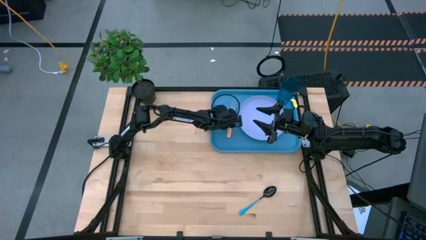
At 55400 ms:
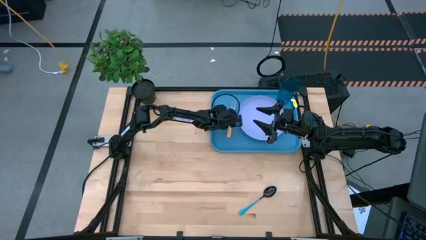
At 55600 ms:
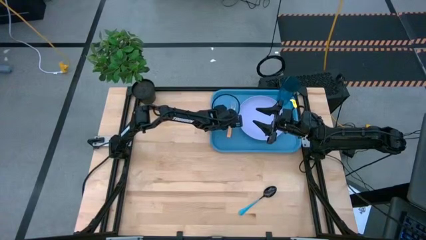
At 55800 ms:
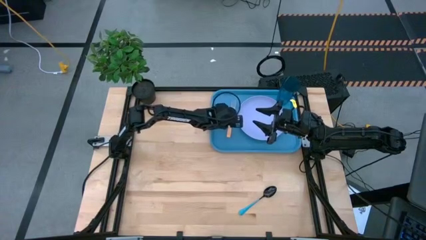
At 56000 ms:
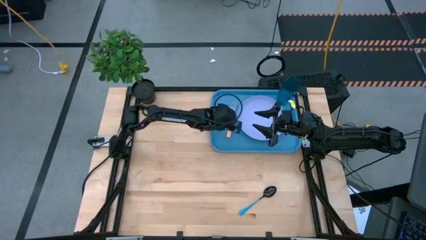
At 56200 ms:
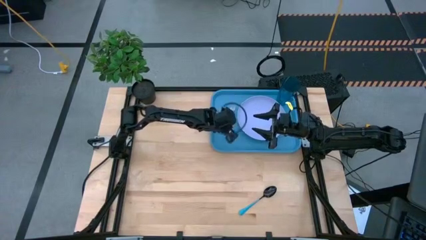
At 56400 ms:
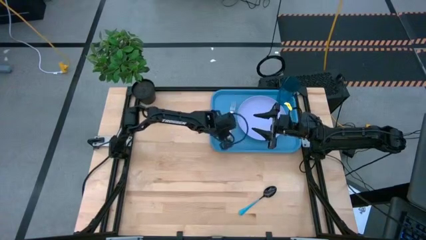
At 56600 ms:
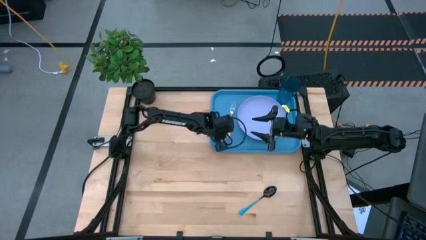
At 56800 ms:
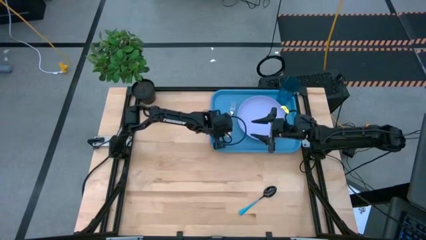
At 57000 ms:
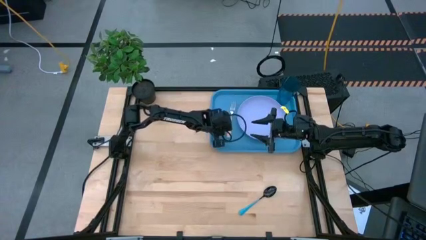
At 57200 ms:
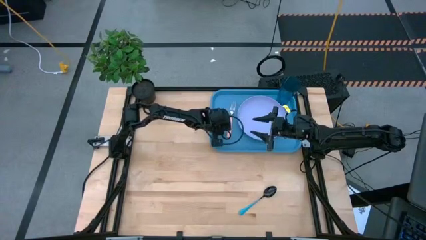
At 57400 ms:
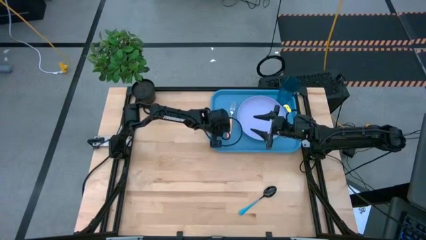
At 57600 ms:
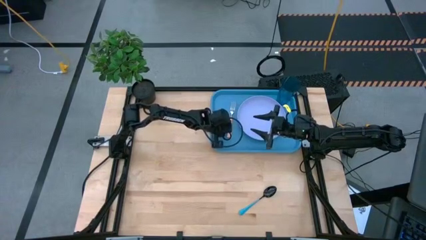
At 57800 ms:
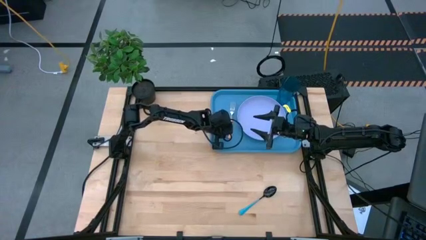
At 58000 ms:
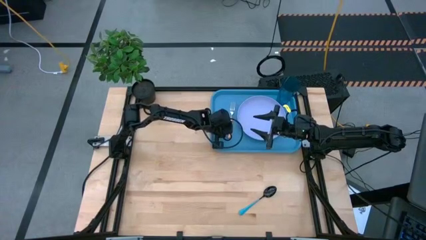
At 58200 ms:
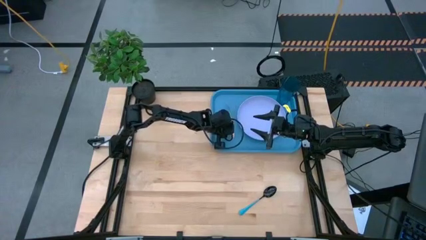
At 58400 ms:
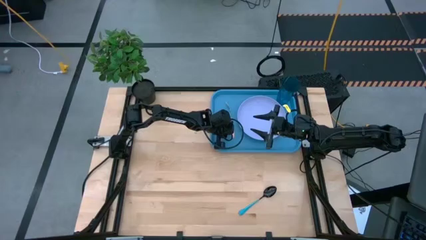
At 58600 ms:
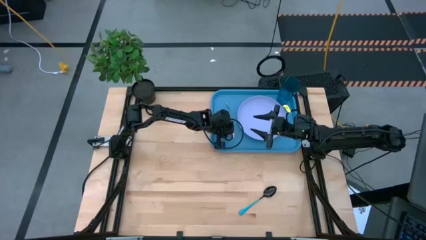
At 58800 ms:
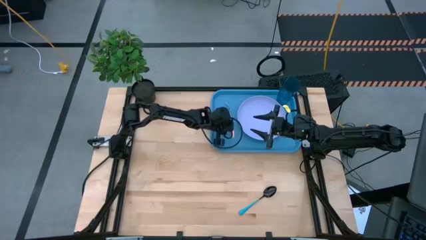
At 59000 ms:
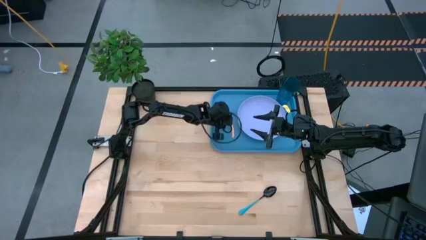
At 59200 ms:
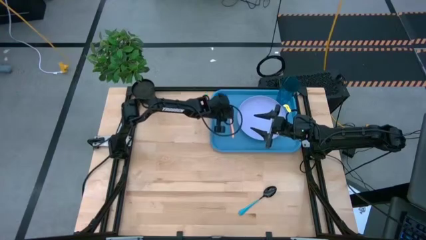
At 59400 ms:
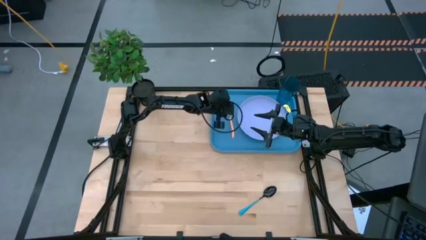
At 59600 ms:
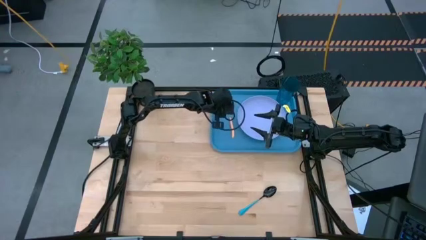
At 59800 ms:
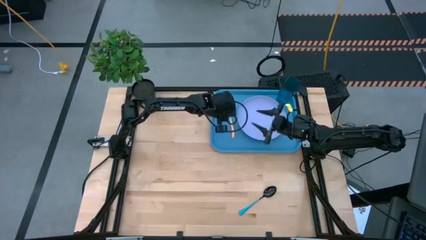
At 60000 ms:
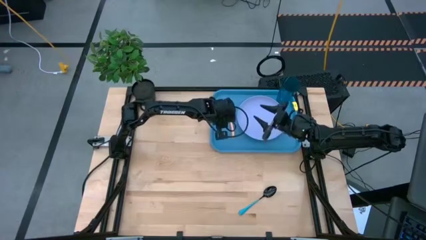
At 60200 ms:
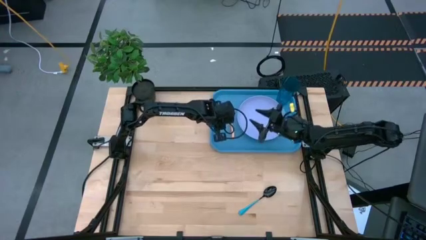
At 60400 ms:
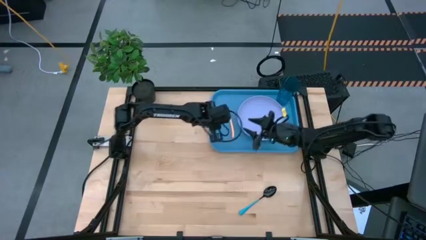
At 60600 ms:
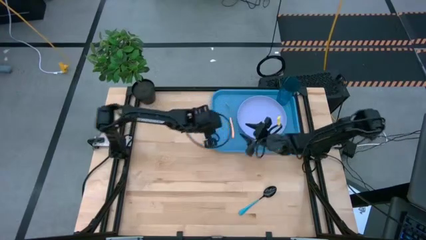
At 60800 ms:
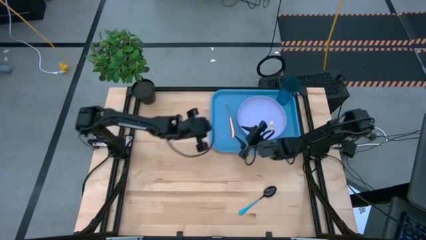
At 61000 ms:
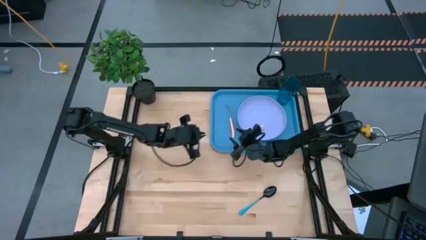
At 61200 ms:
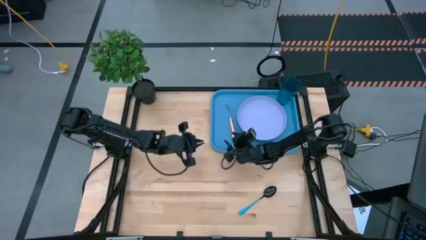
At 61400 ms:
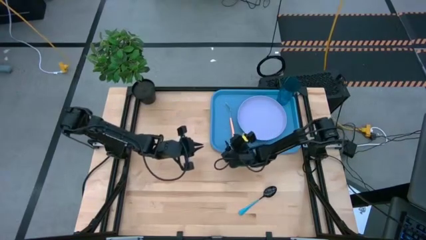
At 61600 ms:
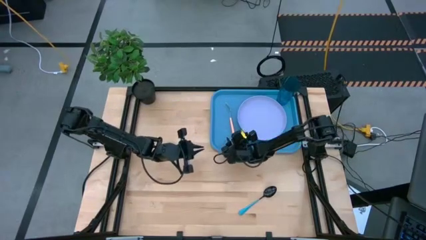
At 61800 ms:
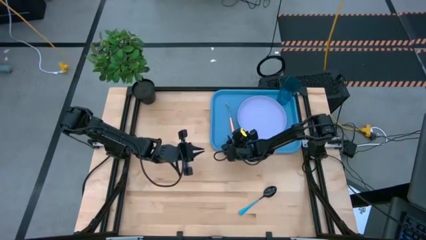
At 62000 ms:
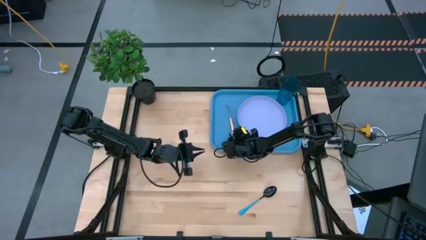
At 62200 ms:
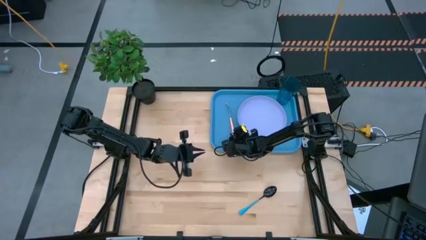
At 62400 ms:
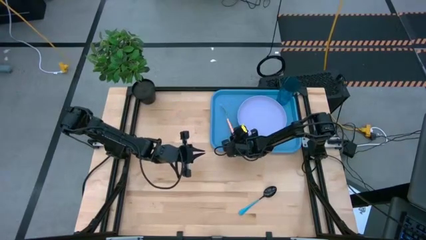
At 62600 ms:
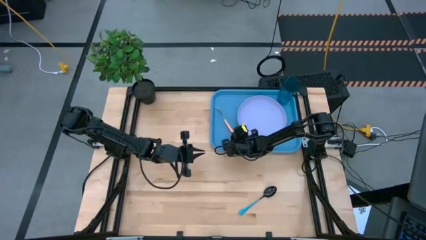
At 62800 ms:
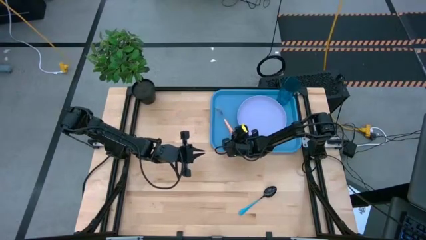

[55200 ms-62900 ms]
Task: Pick and place plate/cup/fork/spoon on tray
Put the brown fork on the blue tray to the left of the purple plate

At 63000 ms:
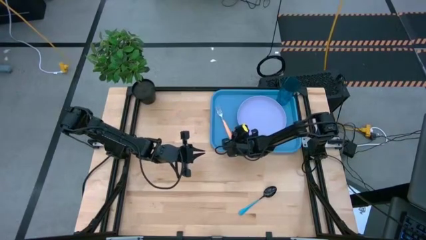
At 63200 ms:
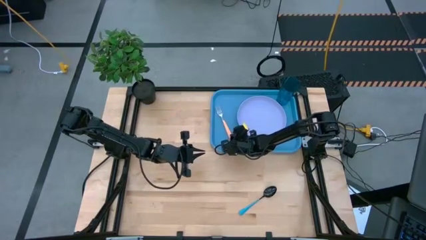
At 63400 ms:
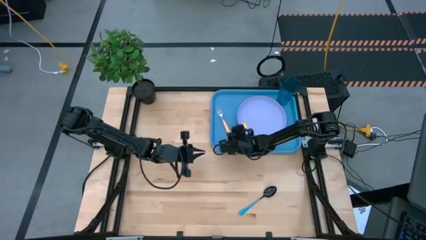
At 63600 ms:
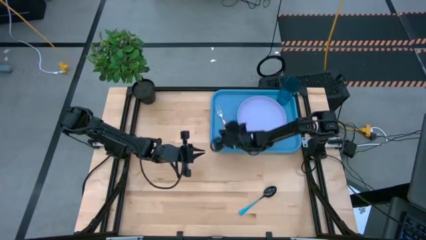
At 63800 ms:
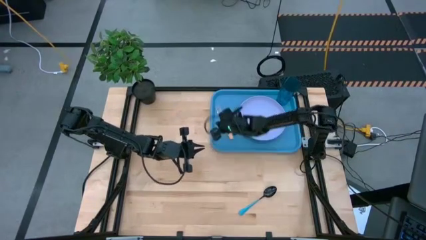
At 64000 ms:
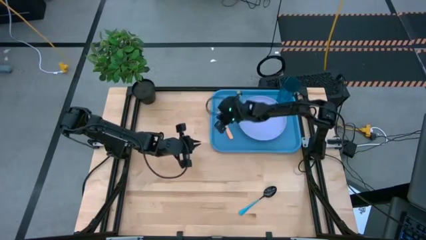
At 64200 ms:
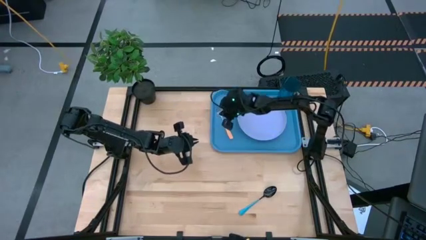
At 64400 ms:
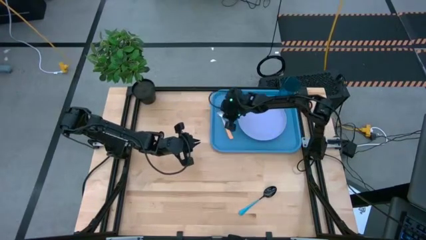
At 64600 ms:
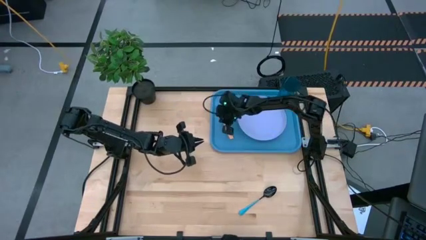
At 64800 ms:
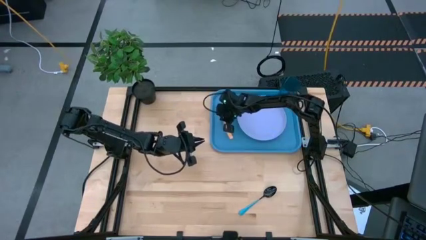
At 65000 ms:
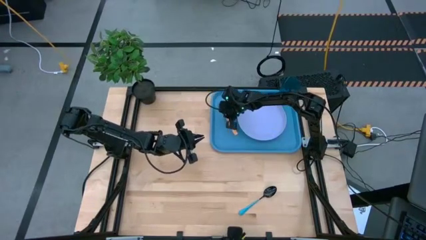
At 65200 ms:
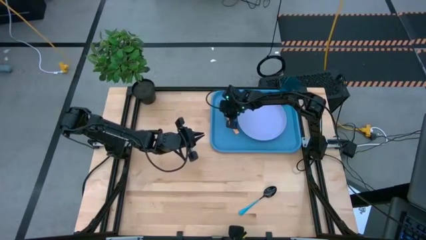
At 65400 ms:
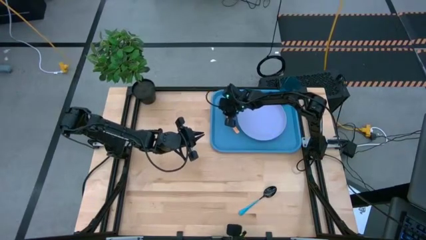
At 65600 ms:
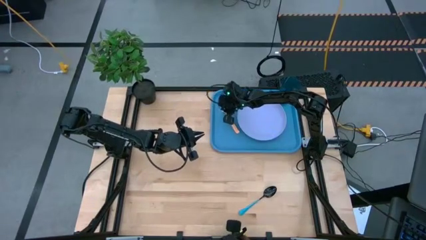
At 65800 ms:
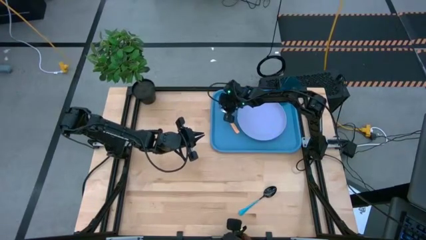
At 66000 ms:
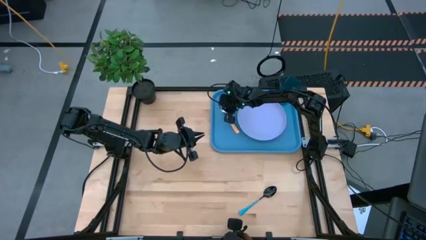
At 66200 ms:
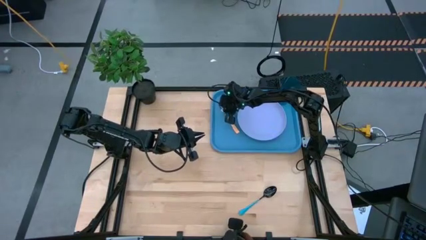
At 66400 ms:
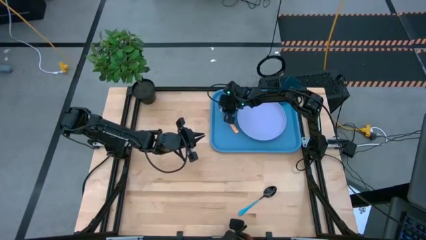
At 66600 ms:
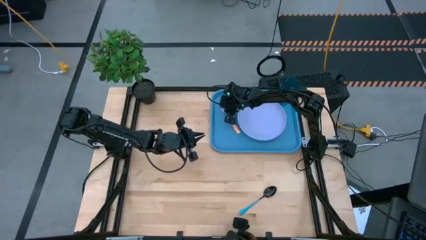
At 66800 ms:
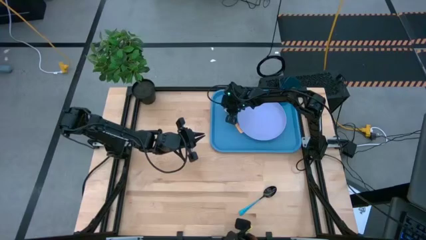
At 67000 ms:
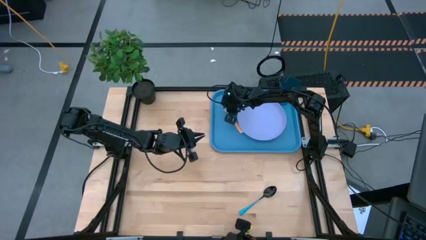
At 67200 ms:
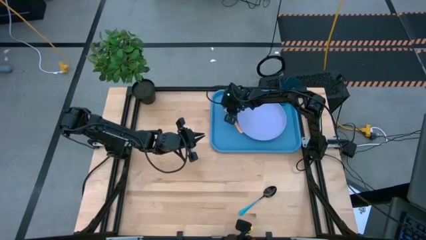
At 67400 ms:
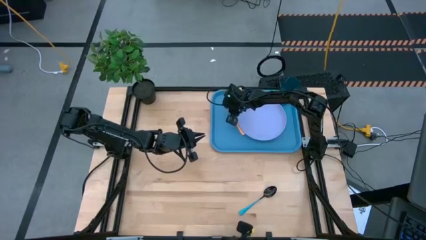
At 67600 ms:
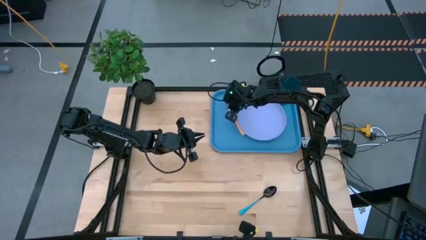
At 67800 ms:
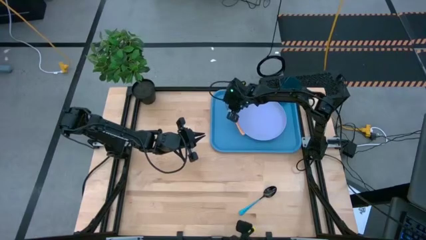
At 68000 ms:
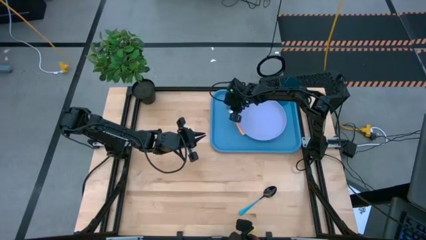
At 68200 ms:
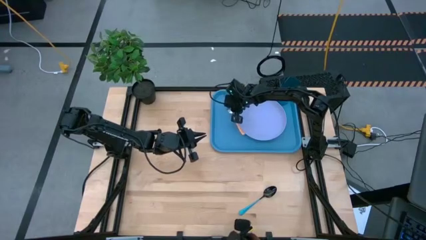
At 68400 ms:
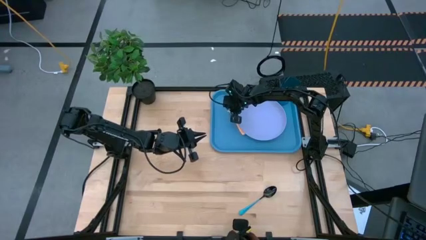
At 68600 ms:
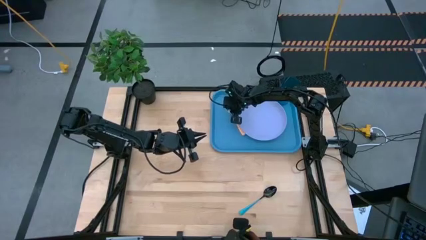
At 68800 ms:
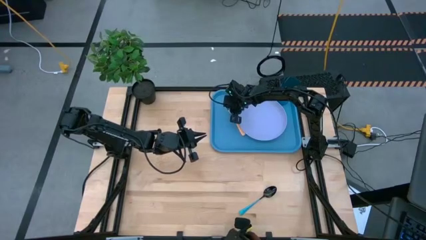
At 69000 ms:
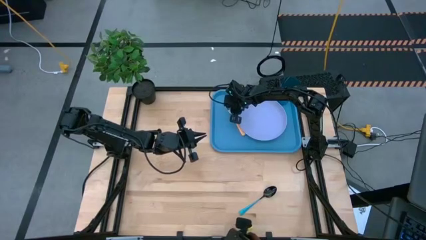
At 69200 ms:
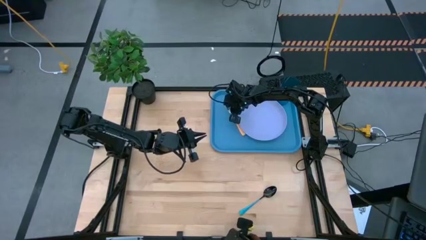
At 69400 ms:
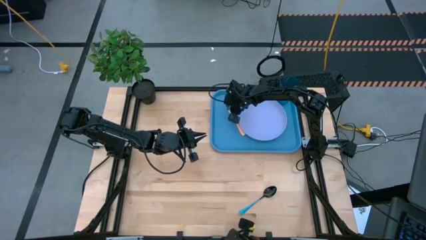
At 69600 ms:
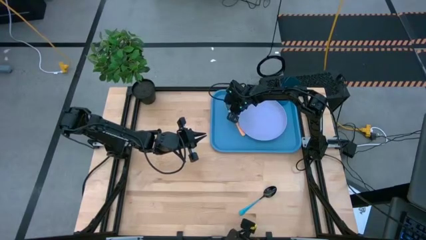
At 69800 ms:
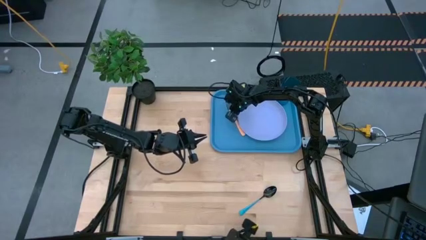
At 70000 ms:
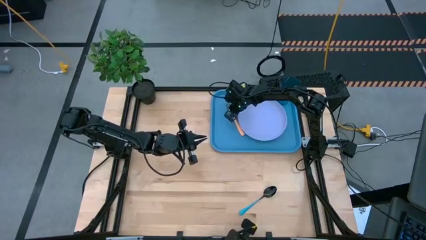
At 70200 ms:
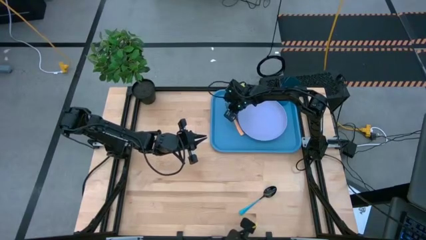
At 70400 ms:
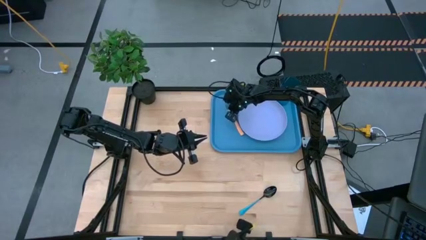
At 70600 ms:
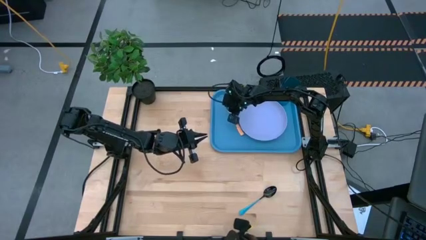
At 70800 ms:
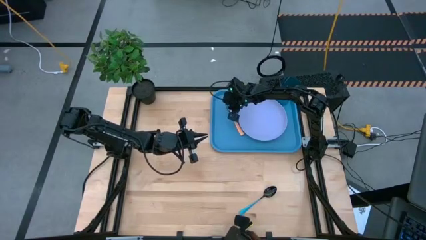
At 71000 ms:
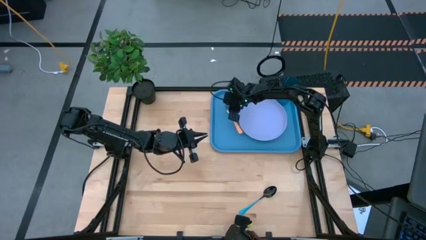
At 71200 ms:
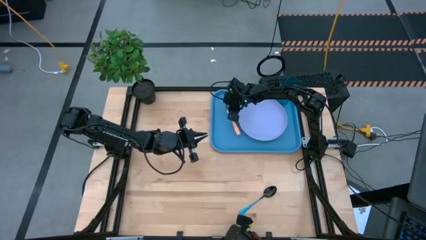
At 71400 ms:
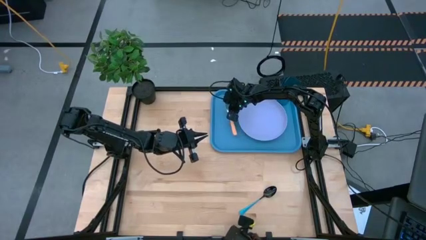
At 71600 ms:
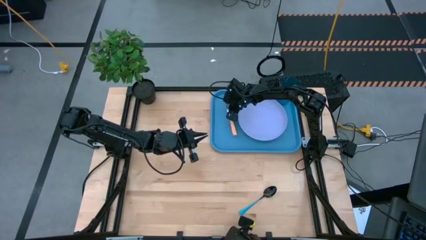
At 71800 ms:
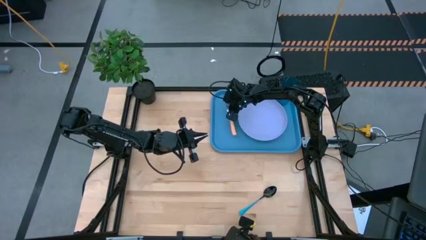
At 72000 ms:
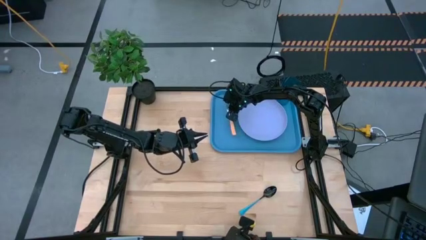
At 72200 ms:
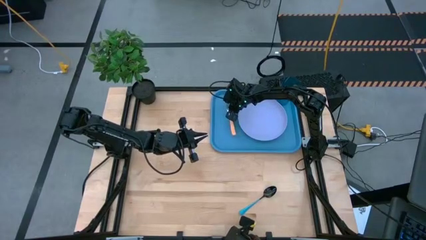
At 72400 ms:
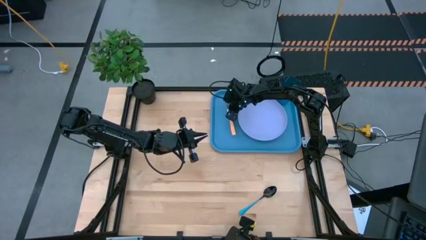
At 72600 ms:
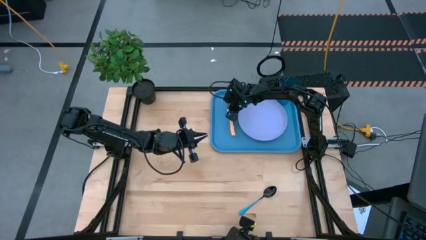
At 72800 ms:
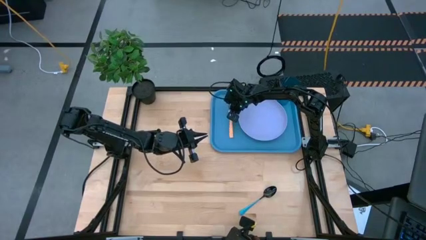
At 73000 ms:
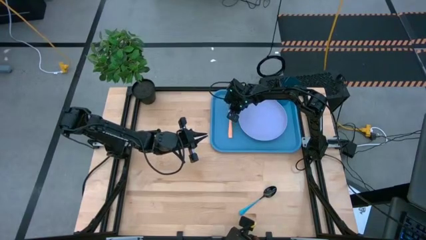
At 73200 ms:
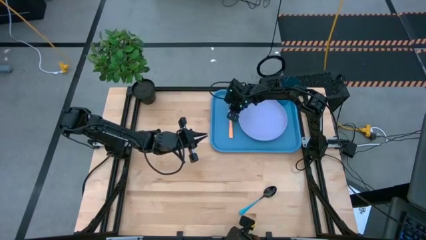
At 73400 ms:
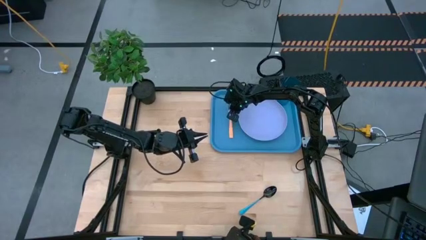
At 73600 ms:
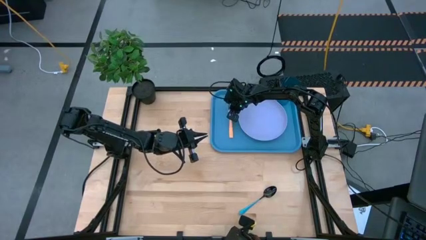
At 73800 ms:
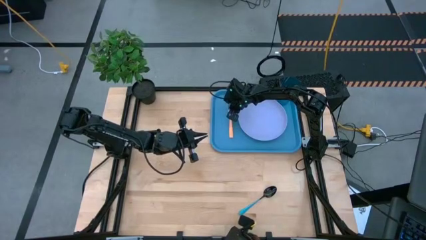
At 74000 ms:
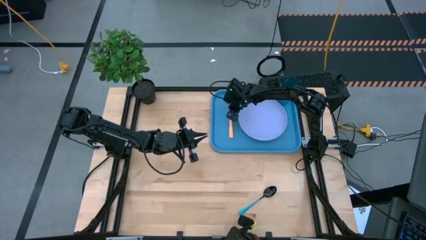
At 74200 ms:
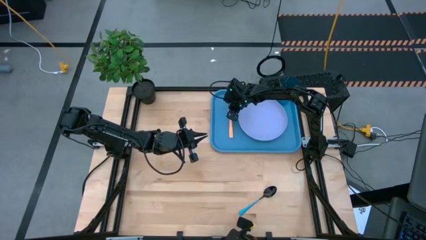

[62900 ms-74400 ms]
Put the brown fork on the blue tray to the left of the purple plate
